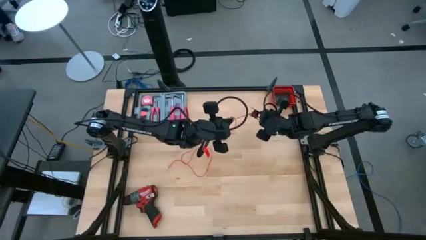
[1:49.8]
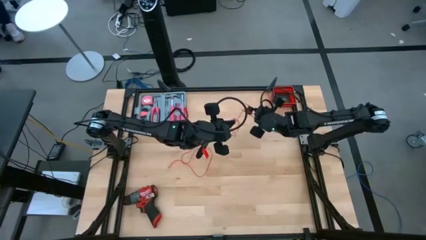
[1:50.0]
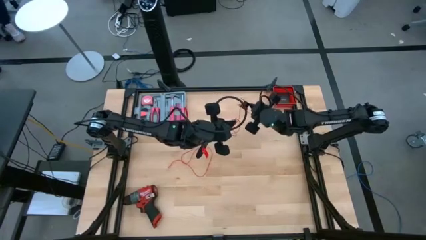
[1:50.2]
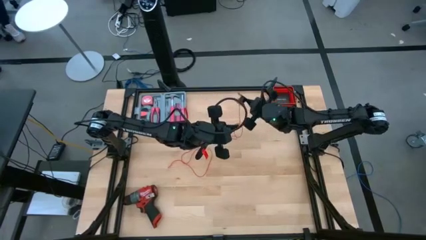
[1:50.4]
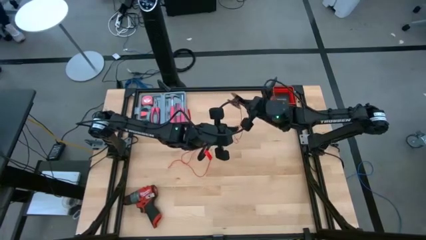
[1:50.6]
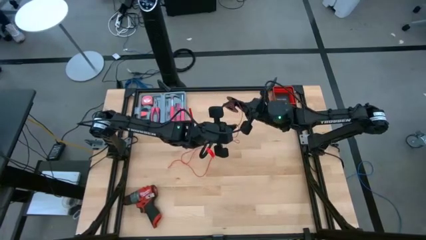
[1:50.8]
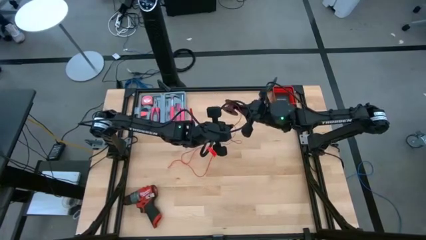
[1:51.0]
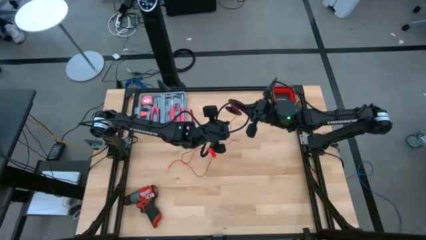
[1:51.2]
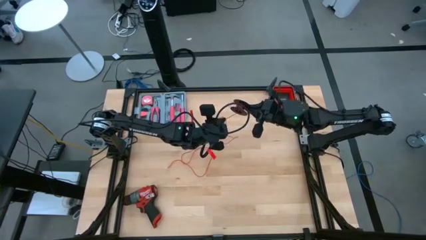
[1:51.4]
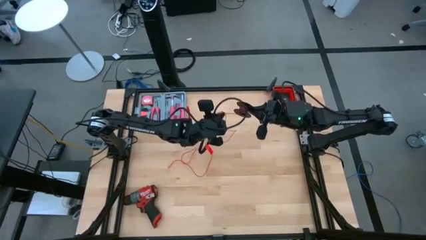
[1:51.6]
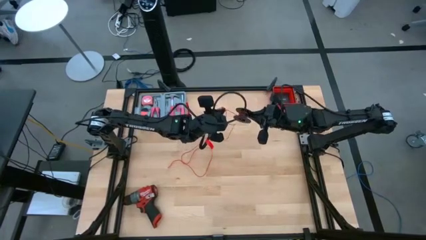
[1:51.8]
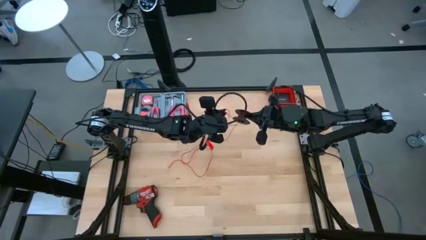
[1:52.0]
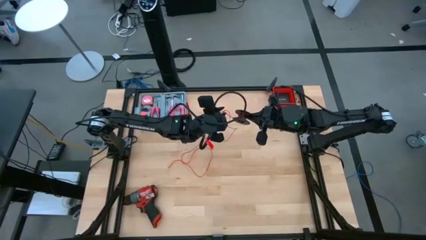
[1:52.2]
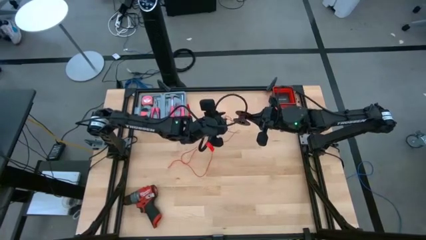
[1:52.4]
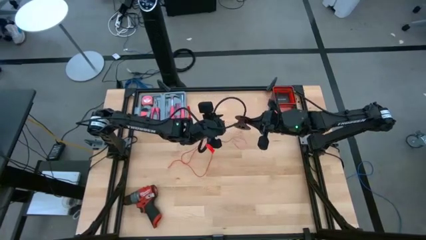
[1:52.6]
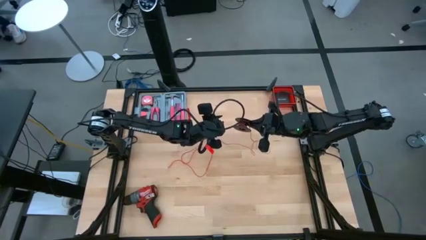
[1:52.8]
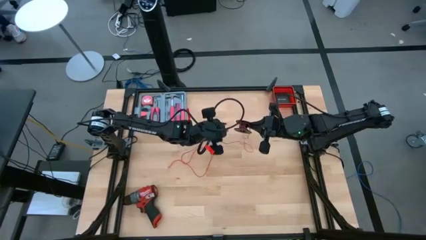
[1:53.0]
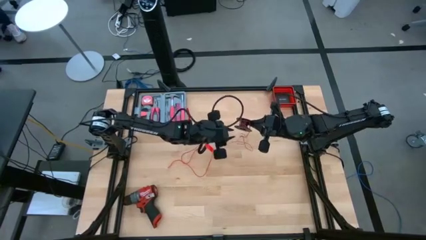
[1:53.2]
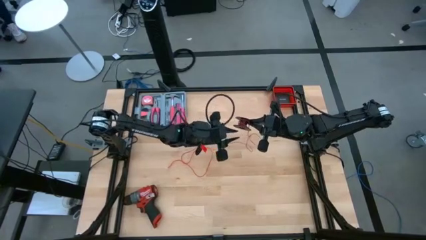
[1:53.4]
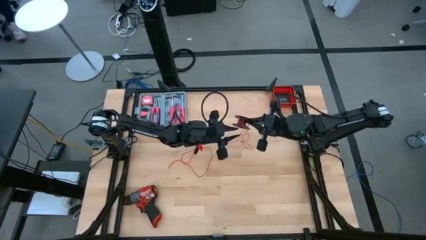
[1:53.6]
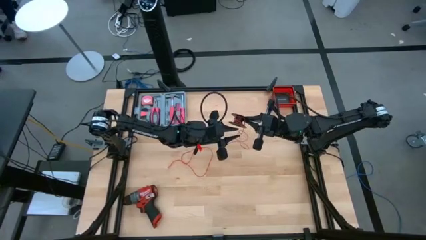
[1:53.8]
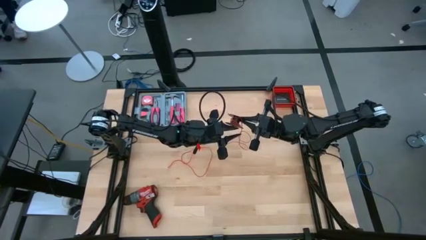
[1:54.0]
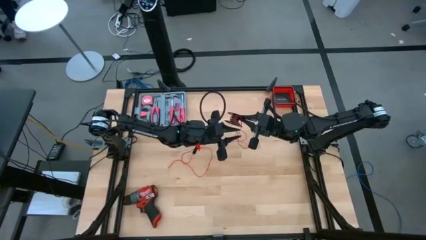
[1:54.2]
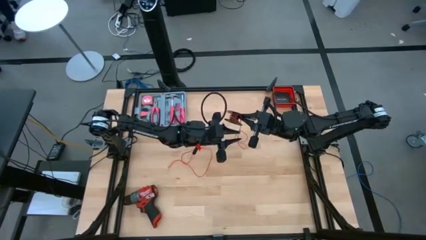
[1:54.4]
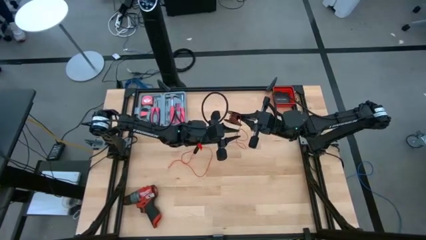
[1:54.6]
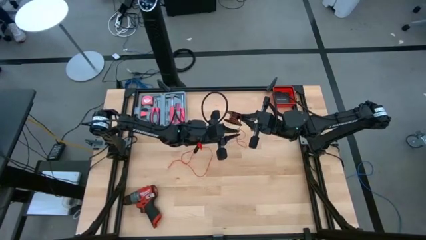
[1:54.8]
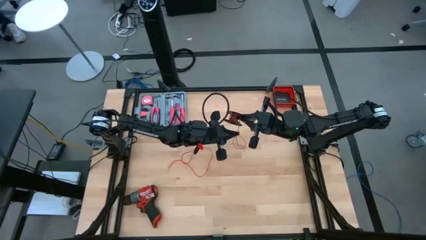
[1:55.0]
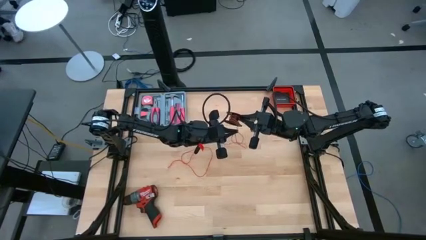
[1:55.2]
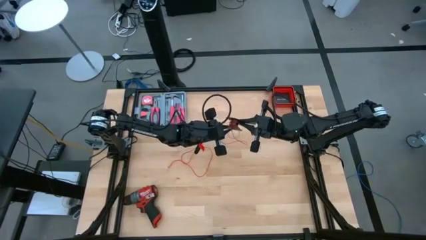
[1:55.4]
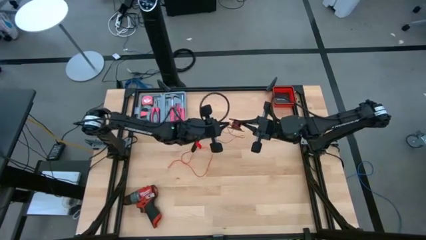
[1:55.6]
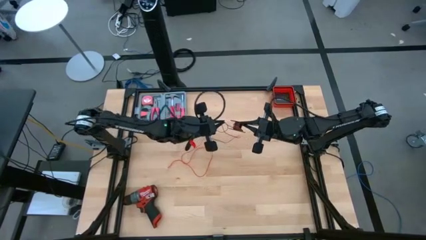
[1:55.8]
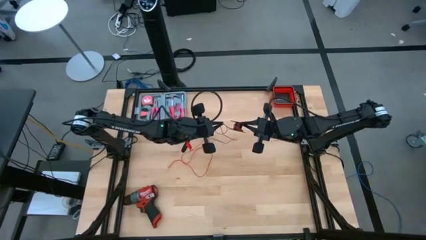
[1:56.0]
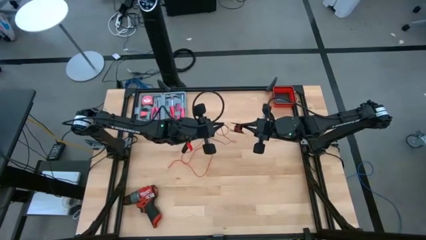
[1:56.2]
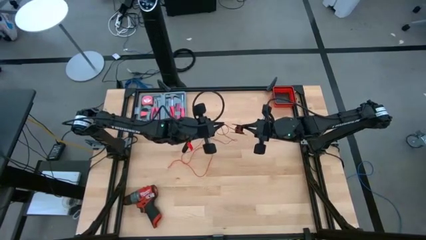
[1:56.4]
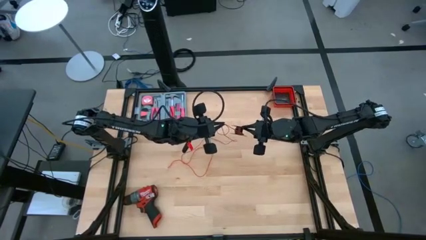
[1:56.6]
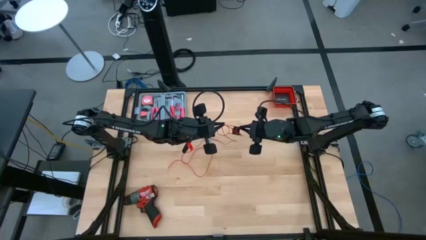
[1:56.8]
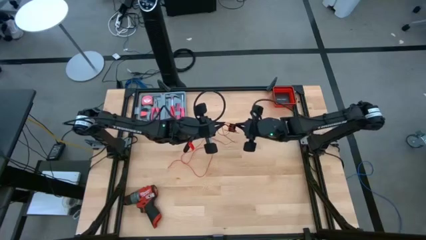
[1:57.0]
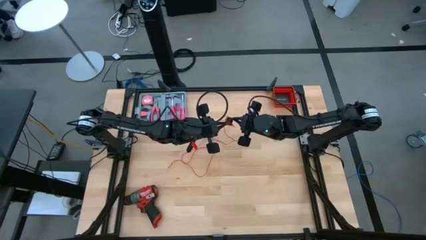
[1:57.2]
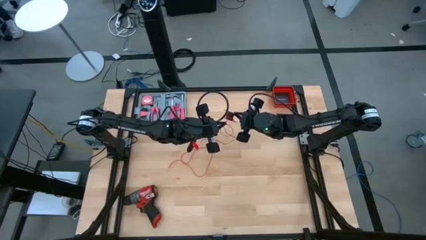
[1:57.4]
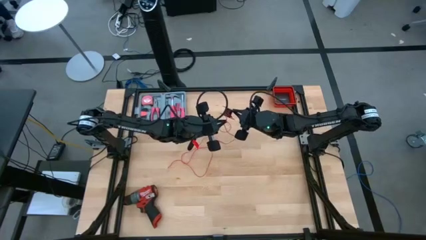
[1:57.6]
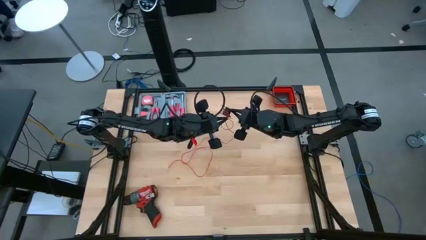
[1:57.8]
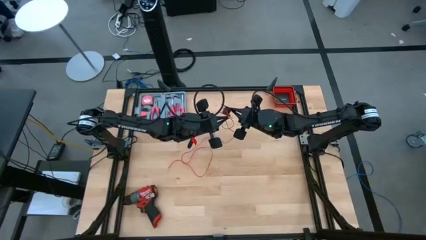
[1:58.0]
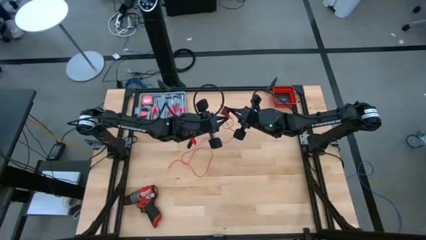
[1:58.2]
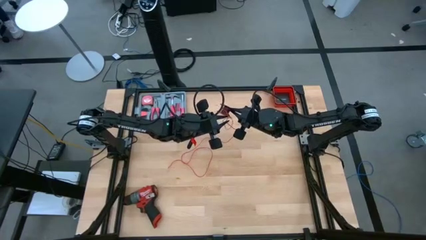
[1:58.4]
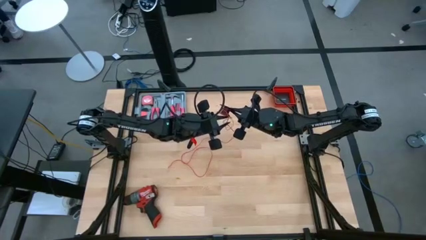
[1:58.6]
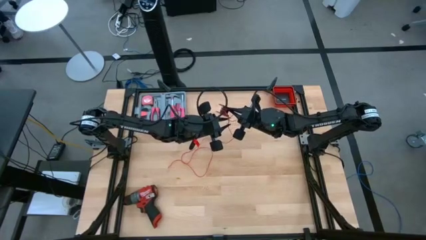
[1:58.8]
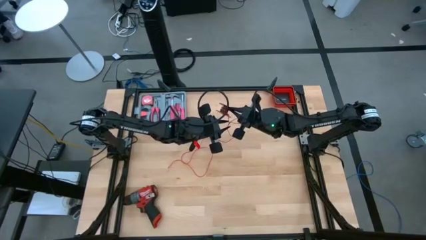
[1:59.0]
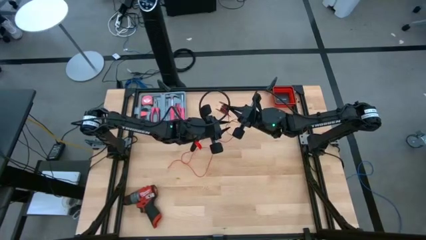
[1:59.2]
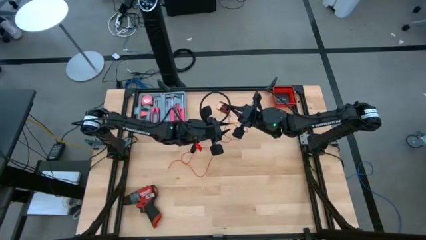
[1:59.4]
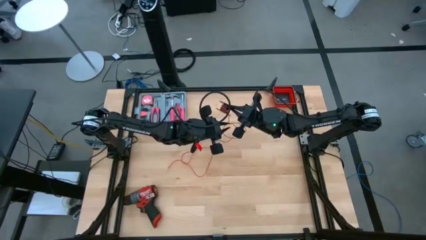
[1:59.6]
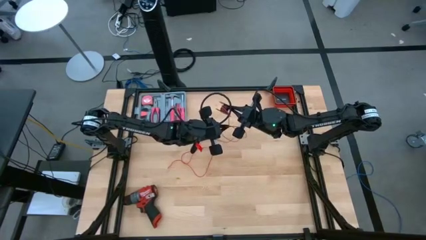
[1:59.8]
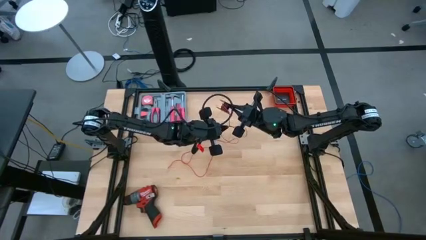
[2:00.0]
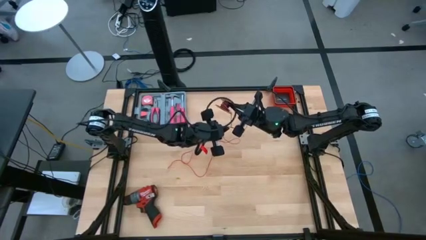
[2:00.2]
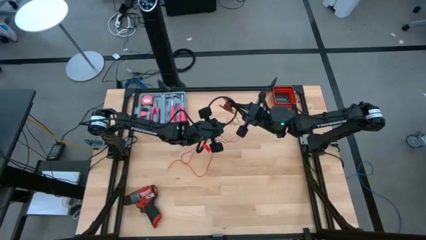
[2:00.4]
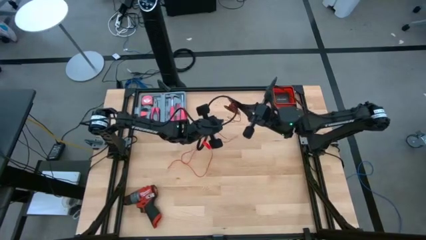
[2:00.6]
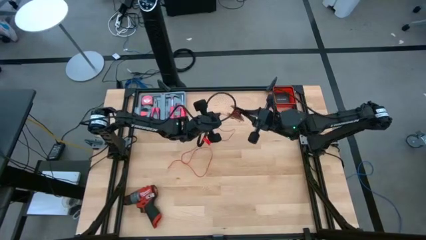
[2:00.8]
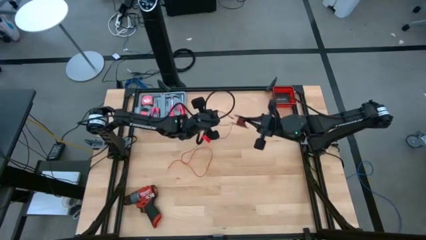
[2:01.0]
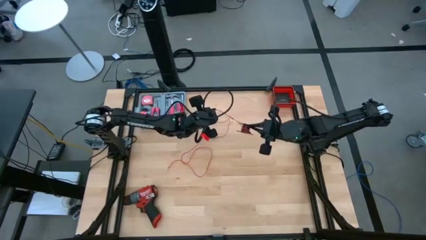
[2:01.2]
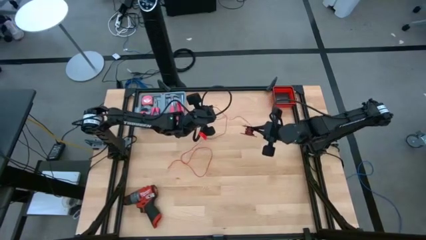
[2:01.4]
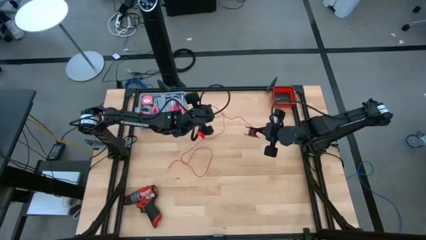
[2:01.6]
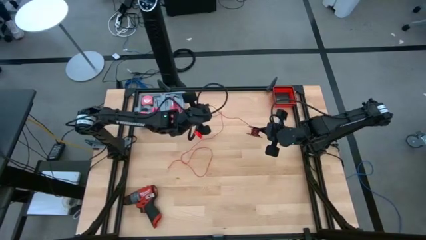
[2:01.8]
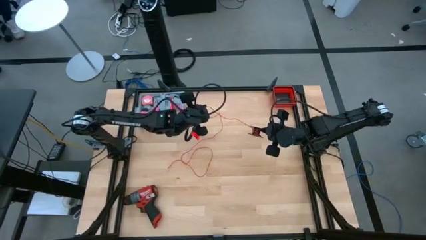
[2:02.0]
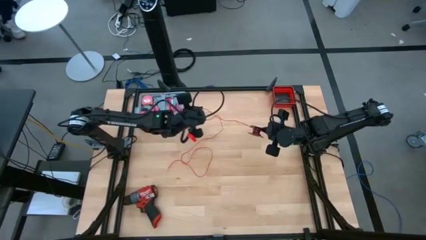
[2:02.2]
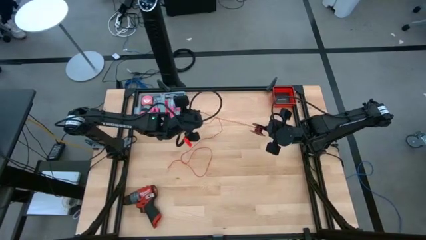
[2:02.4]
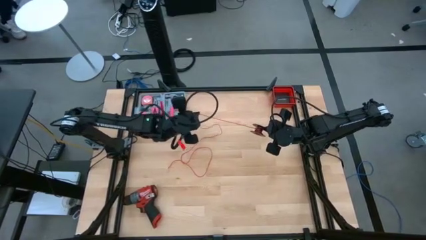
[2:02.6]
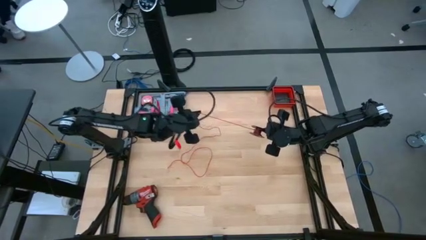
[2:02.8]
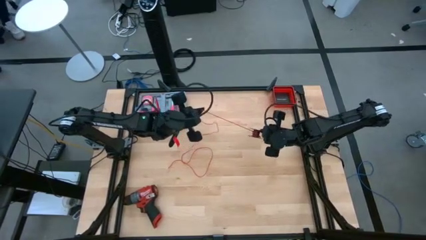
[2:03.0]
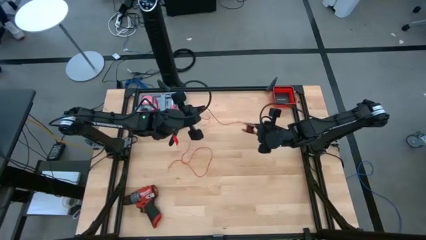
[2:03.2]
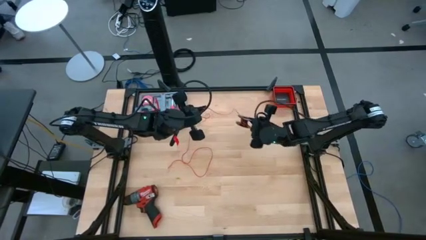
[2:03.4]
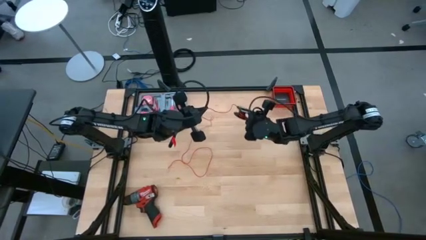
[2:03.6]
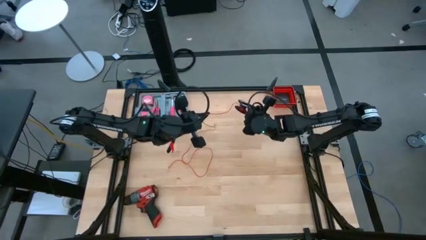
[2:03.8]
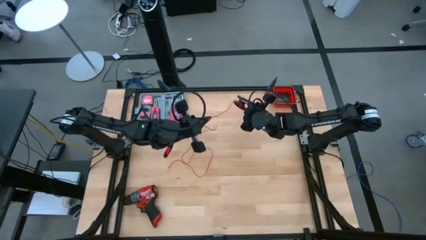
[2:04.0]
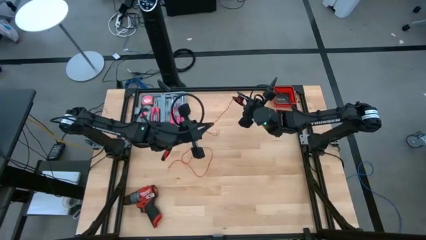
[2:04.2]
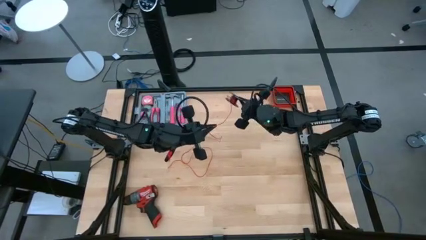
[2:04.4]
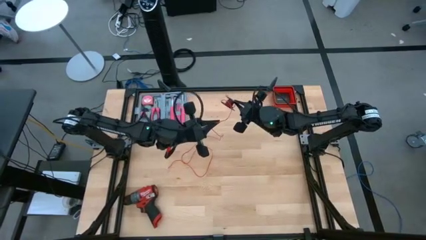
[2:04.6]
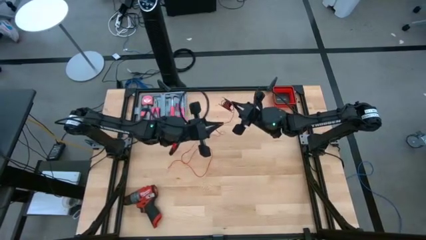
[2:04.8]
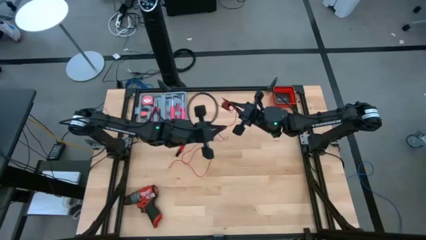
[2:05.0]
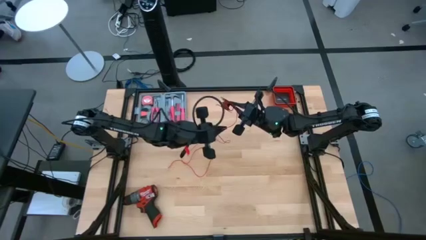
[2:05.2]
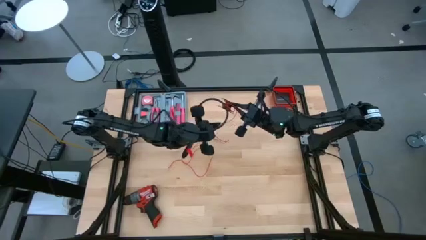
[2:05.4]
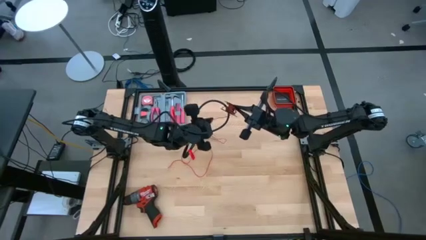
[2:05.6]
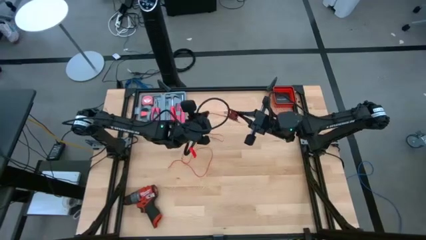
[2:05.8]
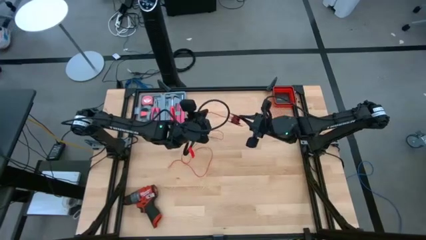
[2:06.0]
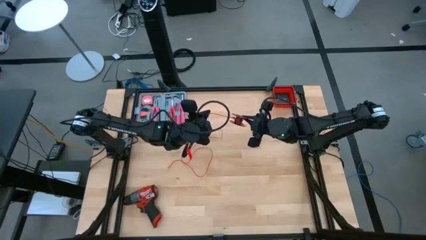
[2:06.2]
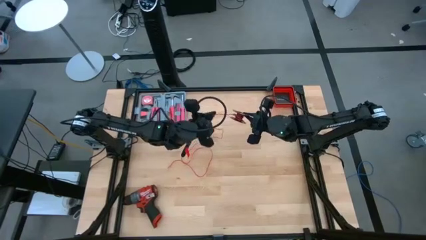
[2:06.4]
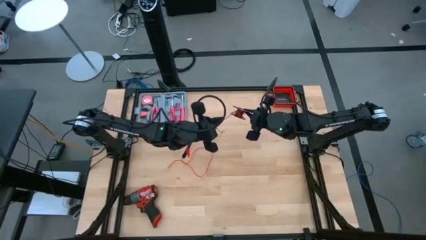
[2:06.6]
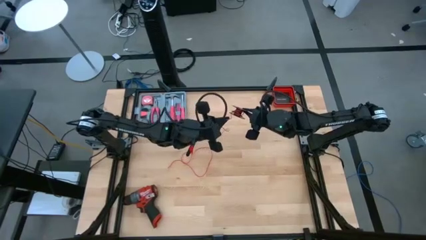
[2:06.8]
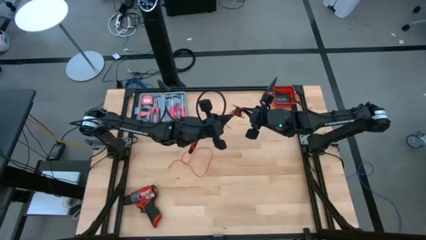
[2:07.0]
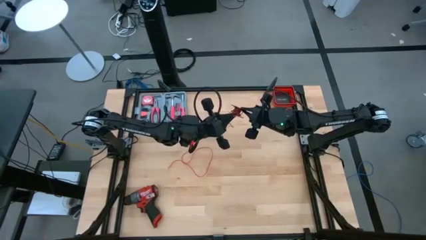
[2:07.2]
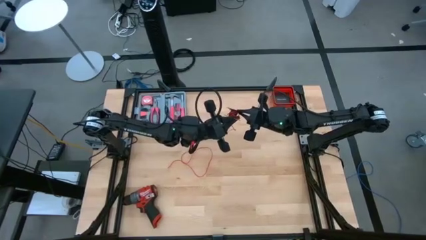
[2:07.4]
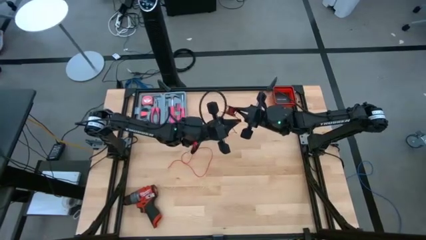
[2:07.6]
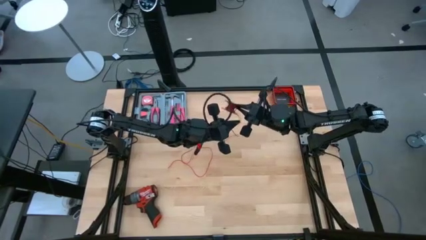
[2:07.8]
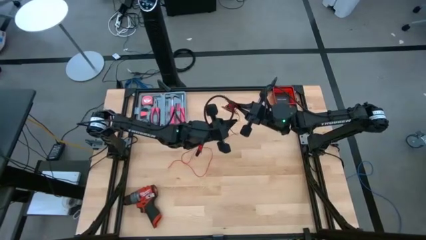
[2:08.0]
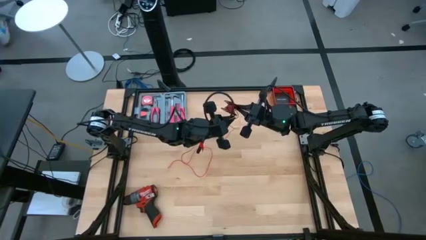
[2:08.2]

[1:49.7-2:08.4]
Task: Coil cords
Coil the red wire on the black spool
